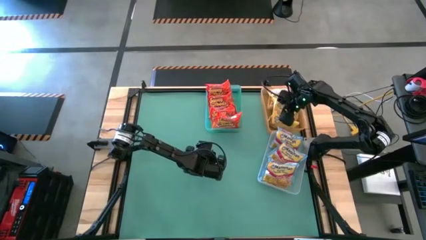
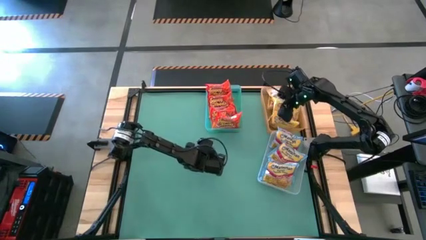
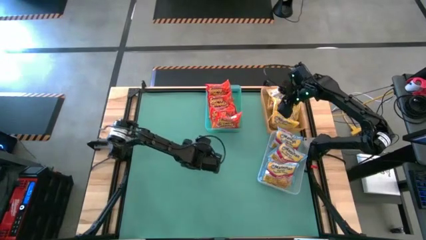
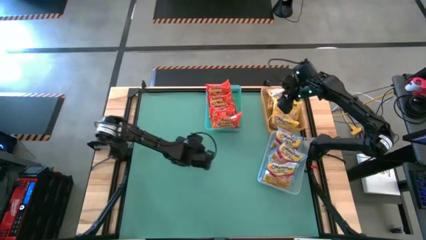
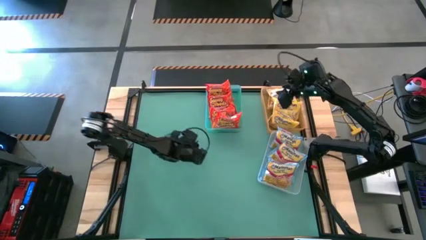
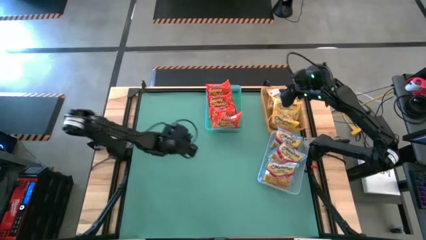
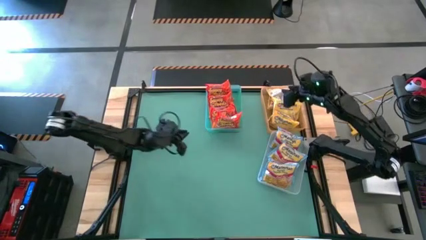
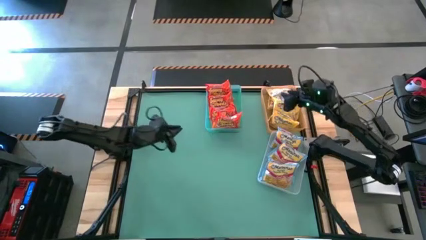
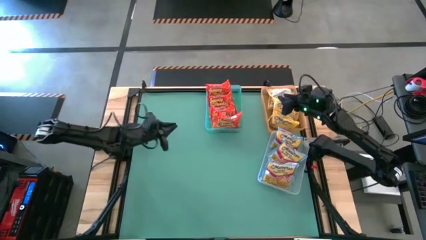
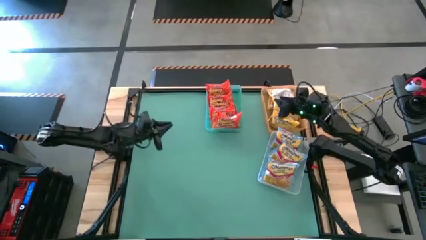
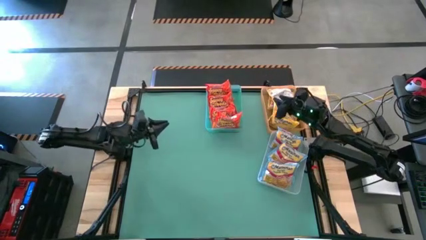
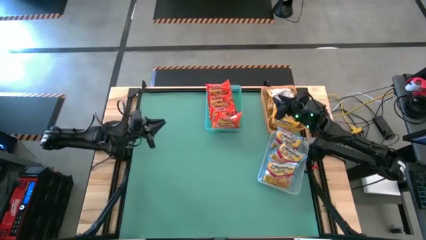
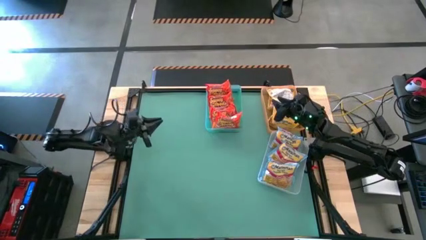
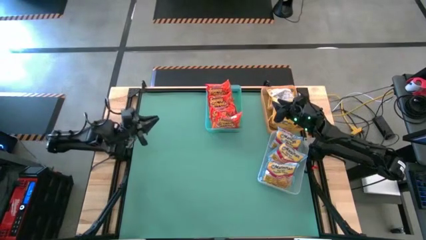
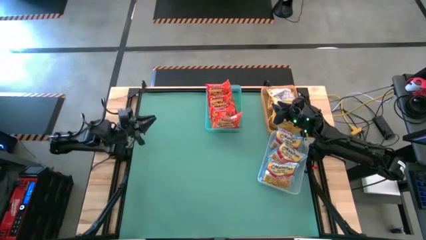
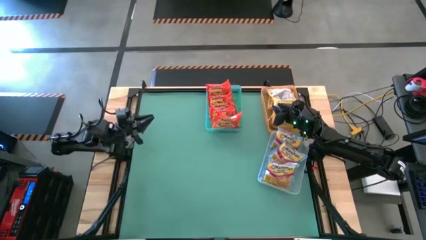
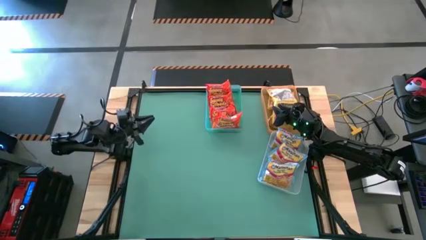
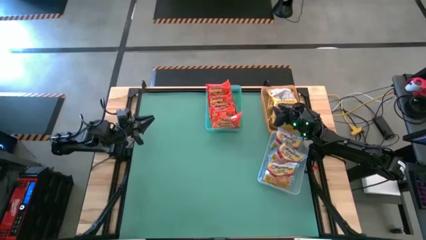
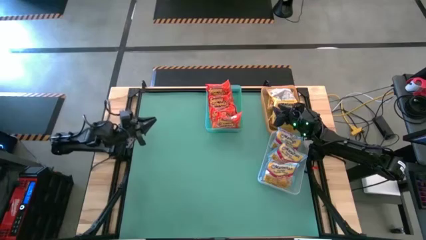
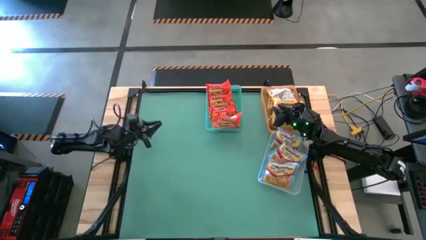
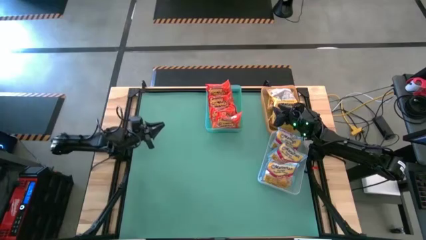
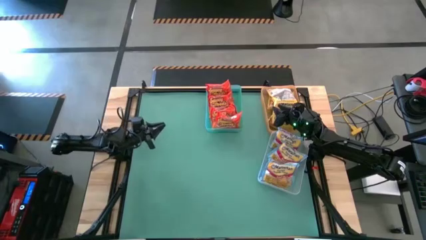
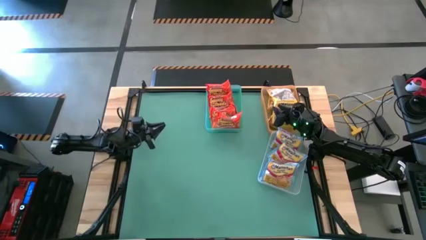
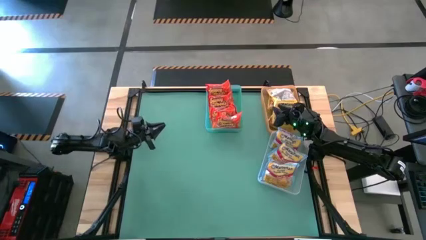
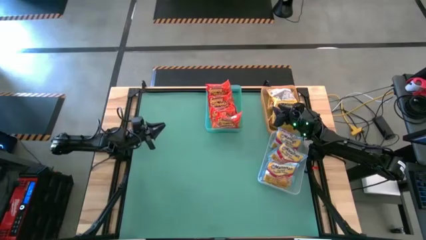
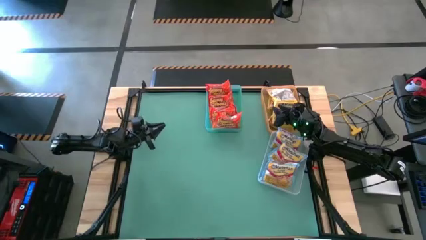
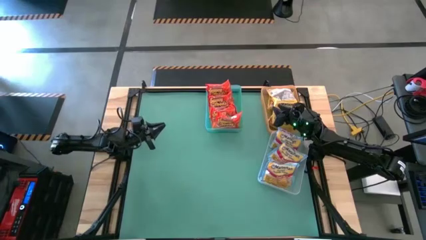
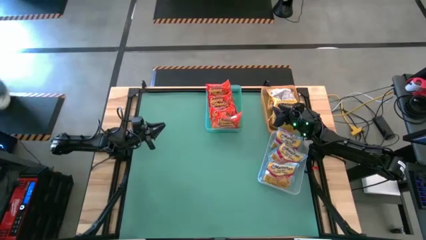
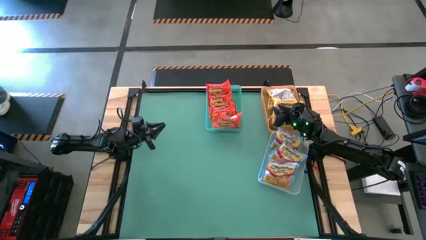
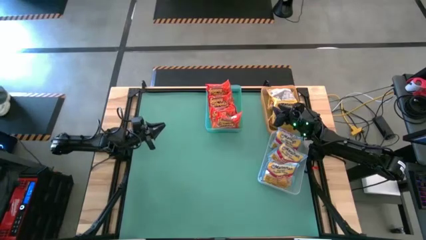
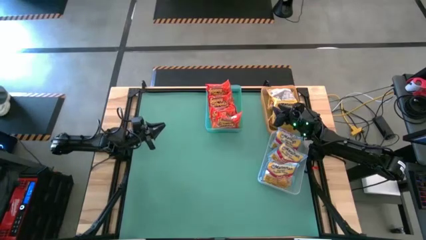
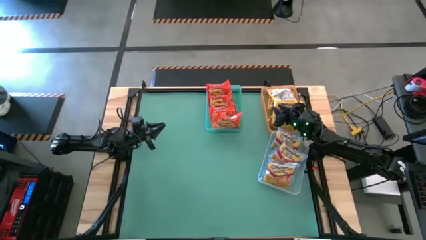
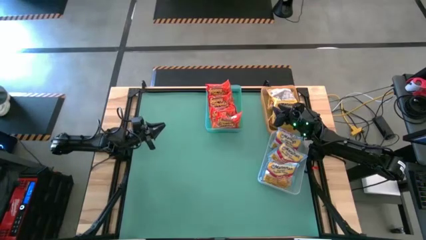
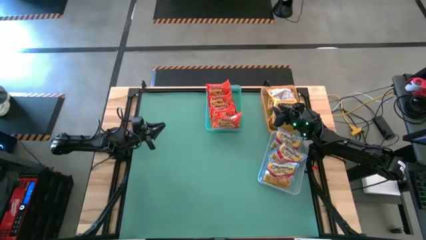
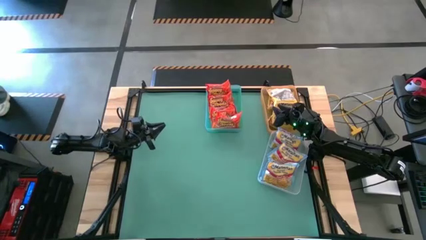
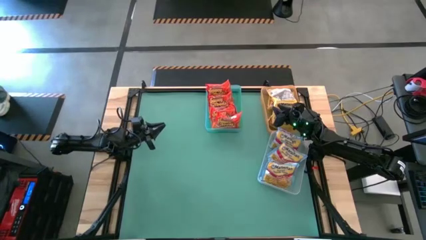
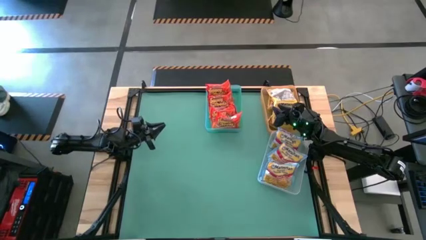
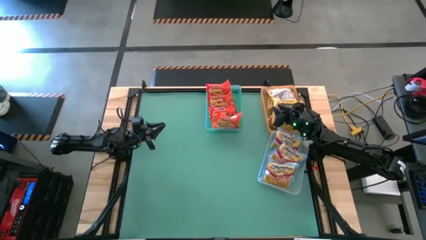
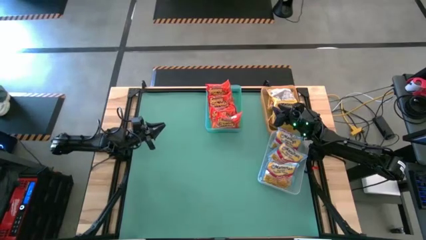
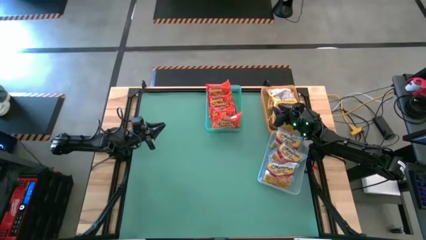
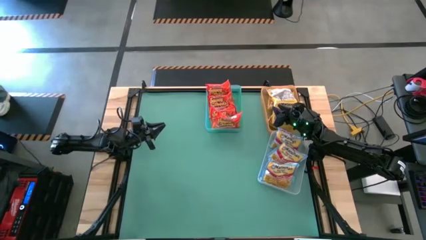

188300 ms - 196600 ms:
Task: Sort Maruchan noodles
Return to Home Position

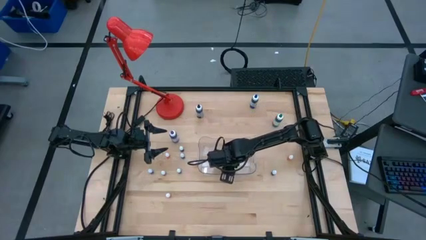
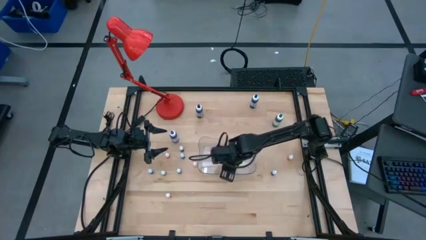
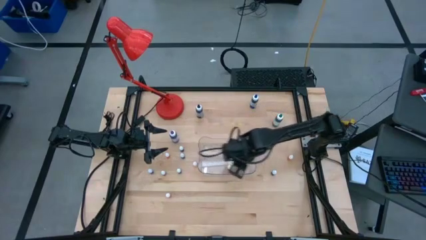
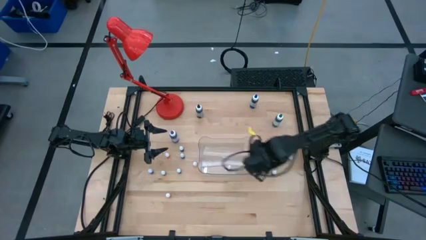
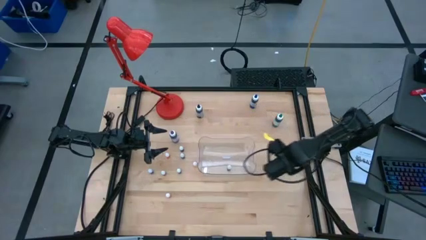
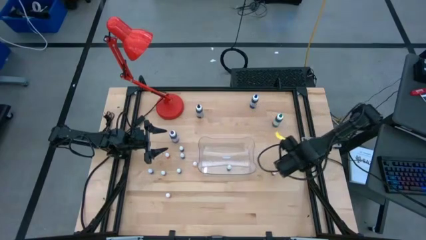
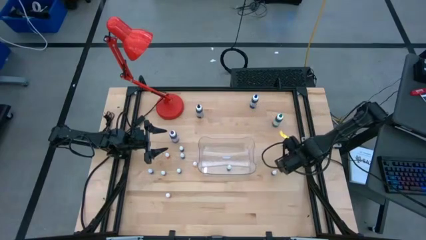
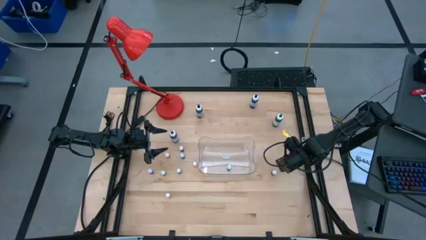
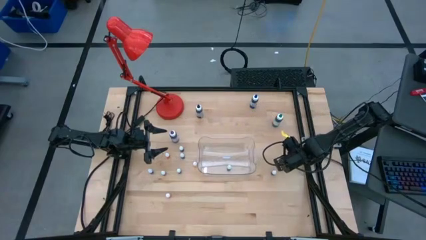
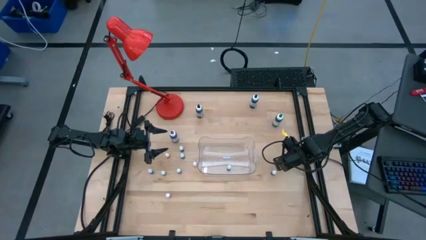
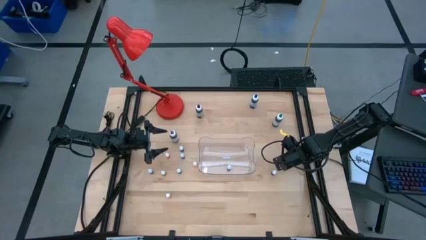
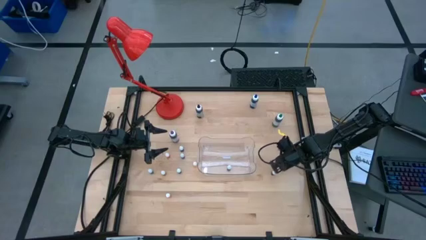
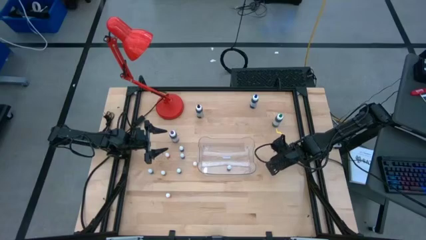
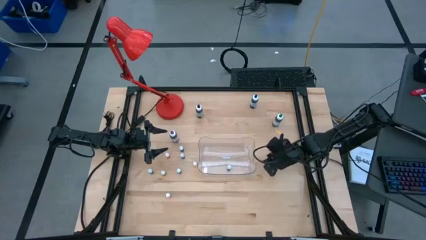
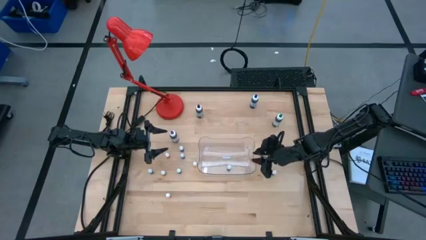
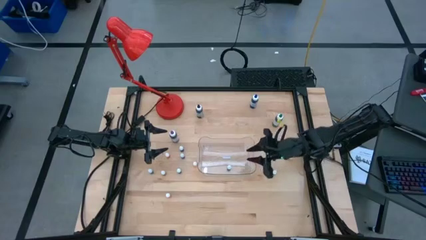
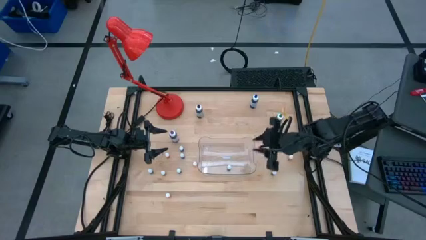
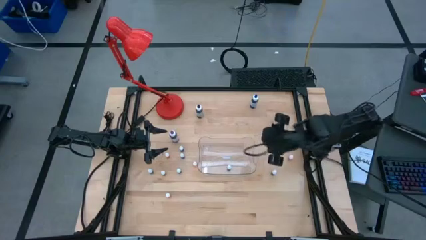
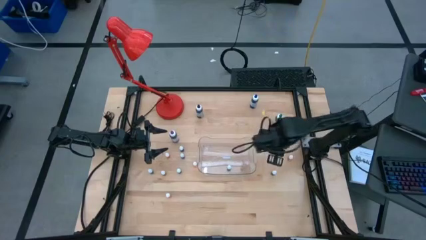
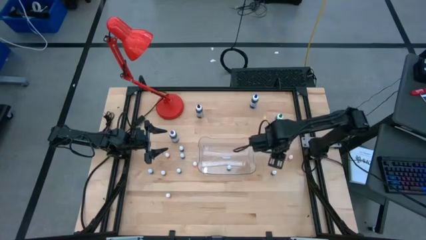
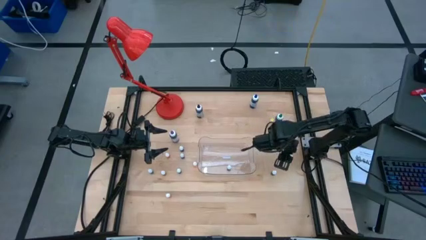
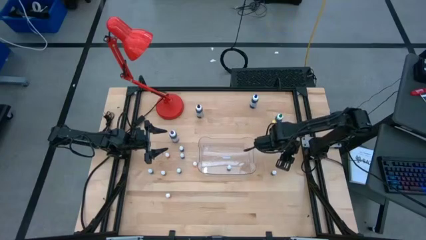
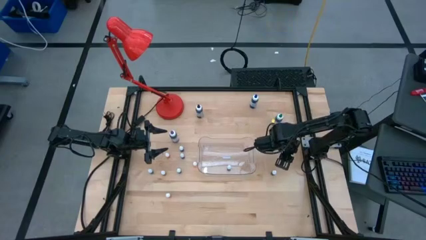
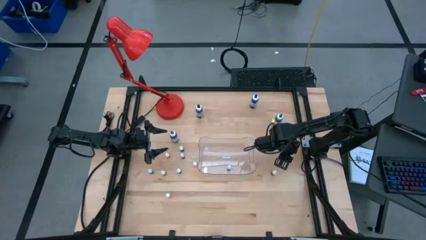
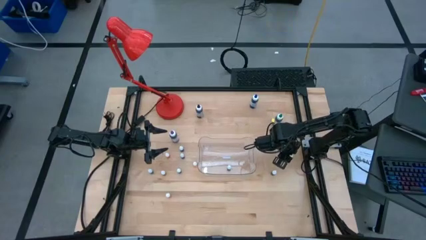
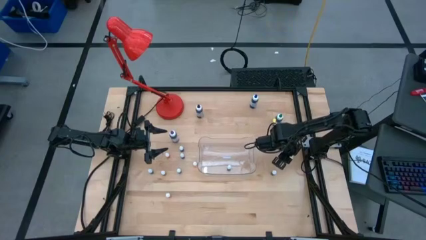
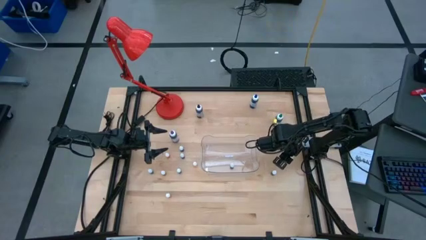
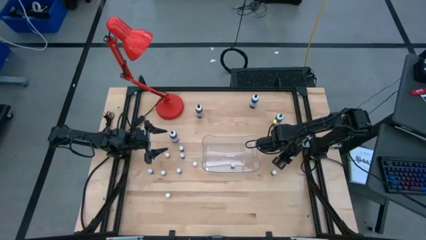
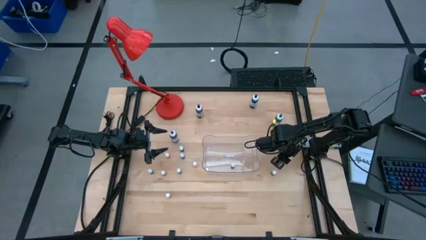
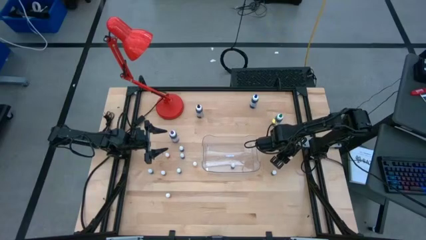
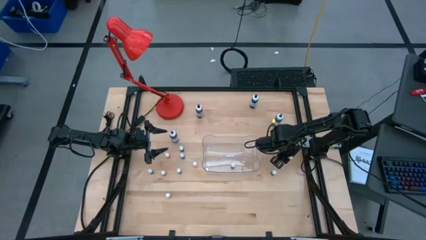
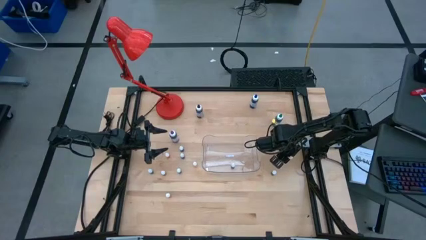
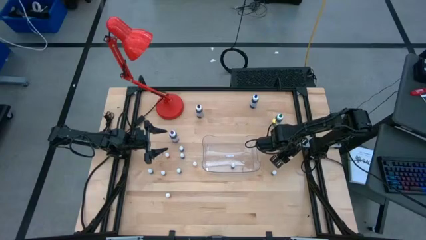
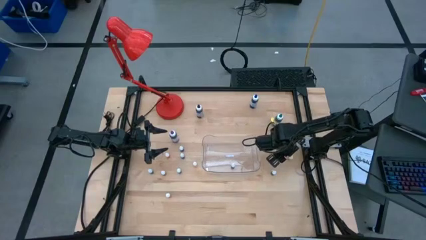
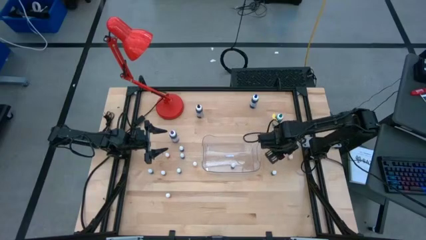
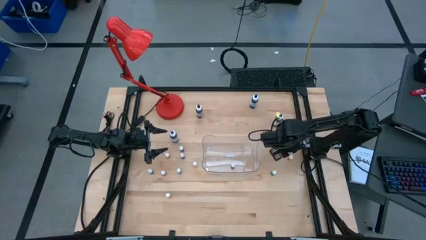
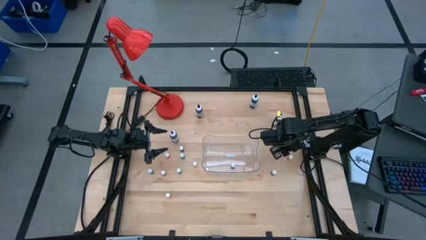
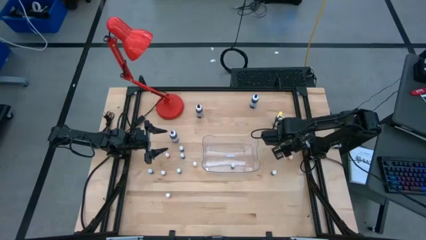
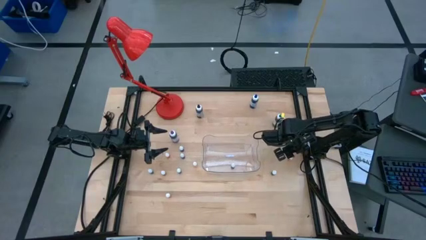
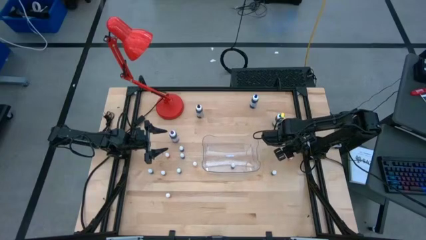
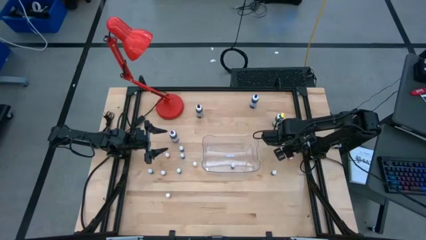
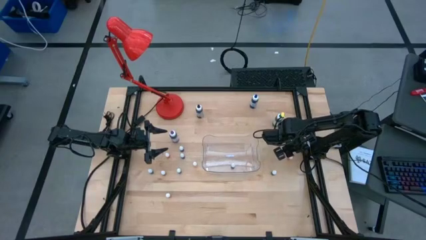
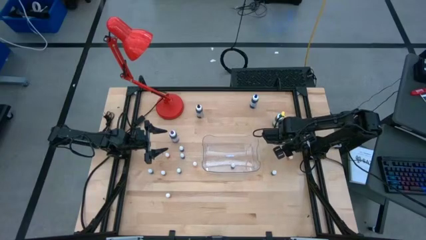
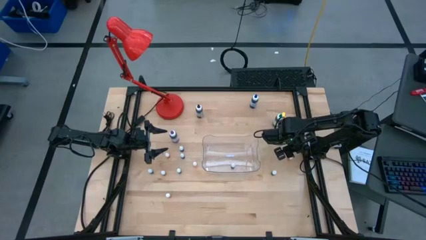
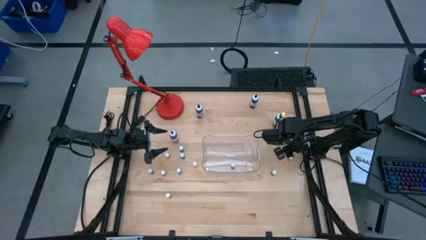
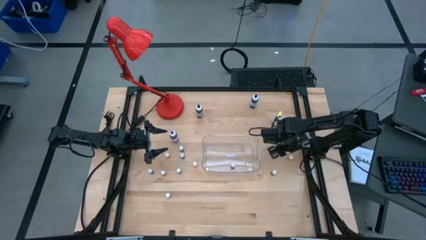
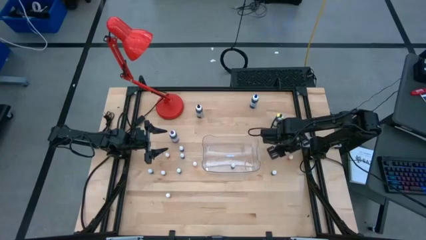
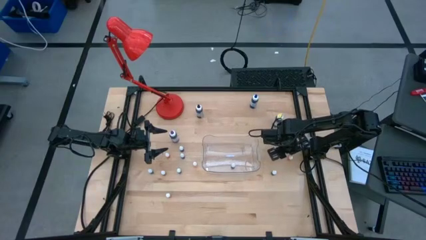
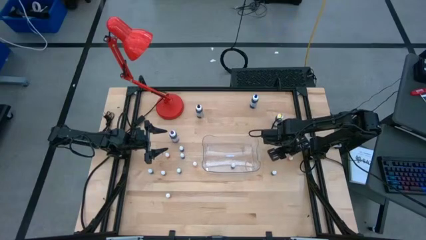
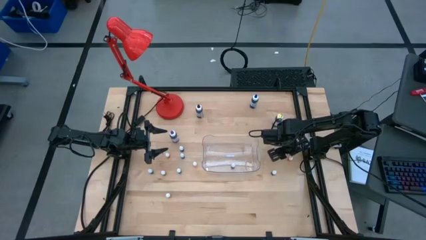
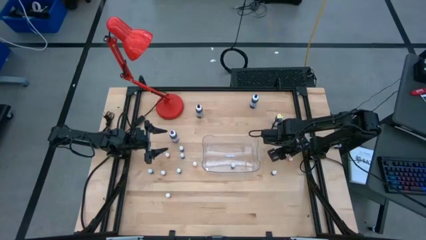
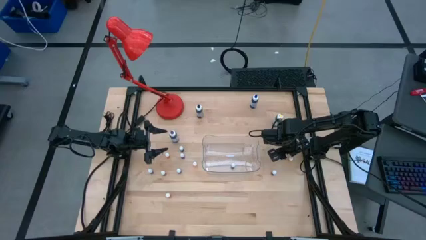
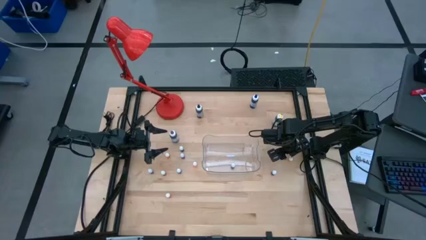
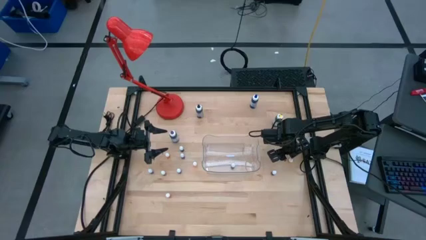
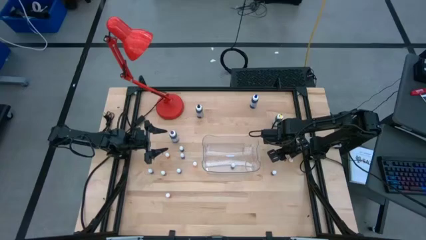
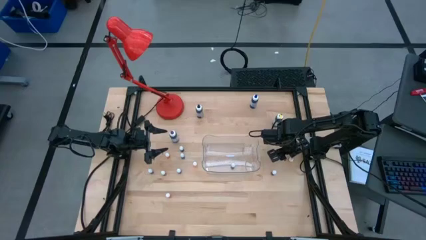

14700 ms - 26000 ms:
Task: Pick & Place food coloring
Put the small orange food coloring bottle into the transparent bin
